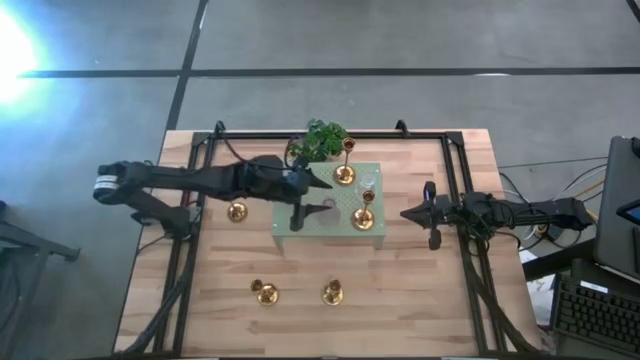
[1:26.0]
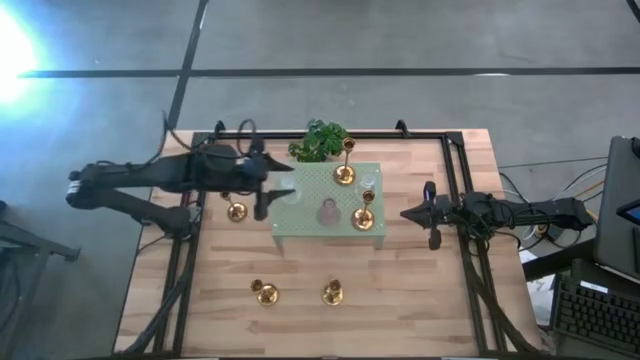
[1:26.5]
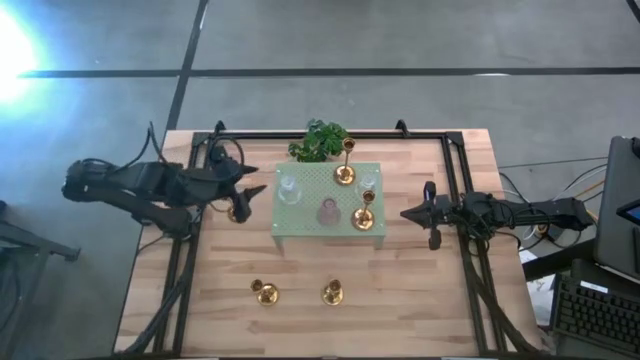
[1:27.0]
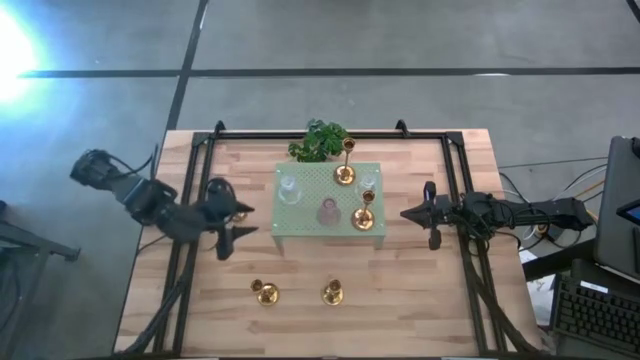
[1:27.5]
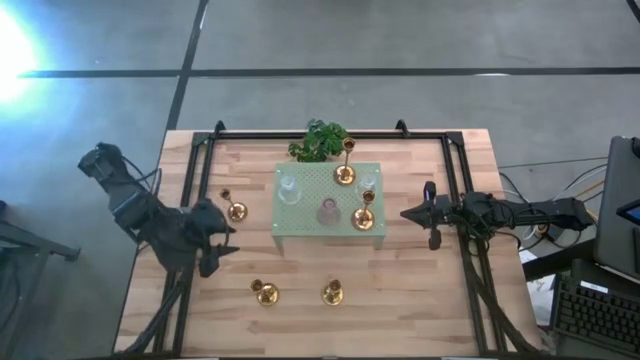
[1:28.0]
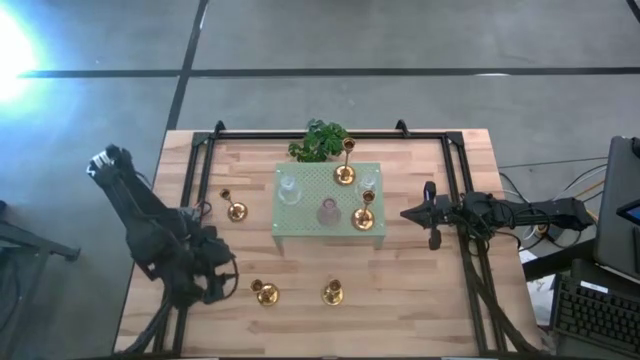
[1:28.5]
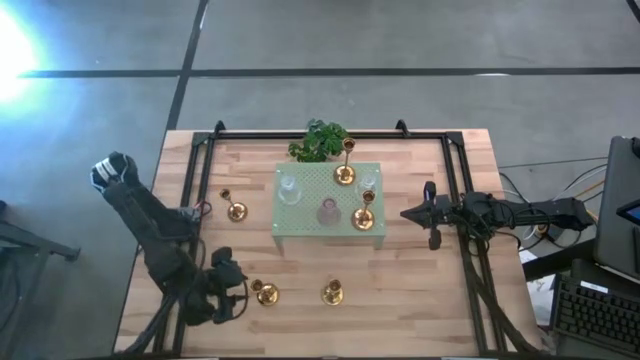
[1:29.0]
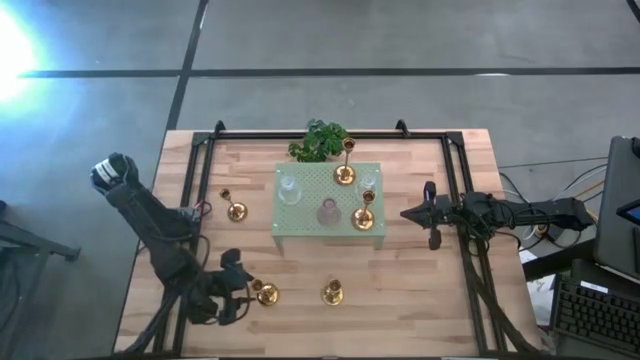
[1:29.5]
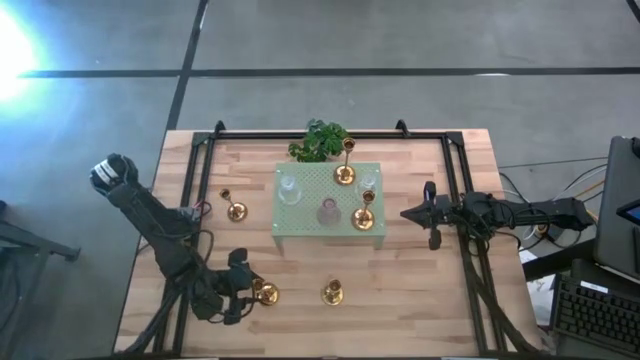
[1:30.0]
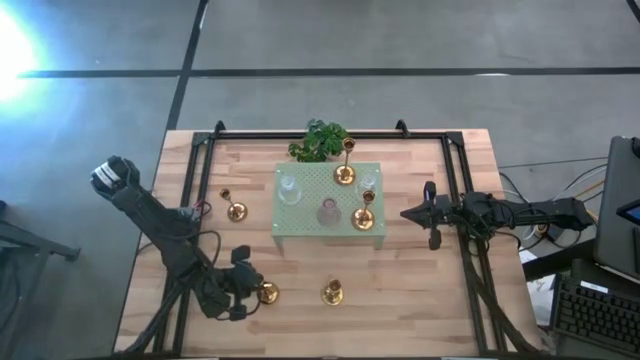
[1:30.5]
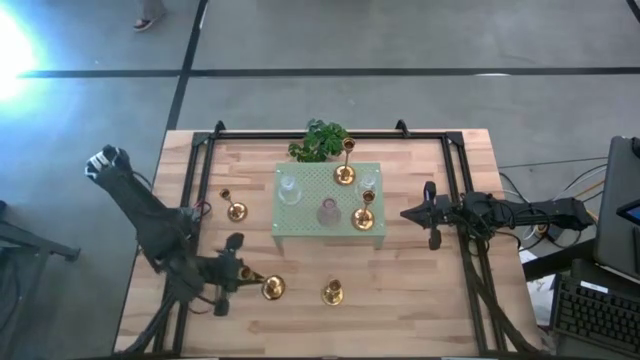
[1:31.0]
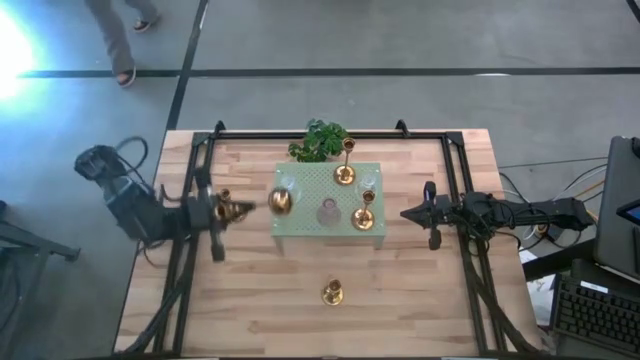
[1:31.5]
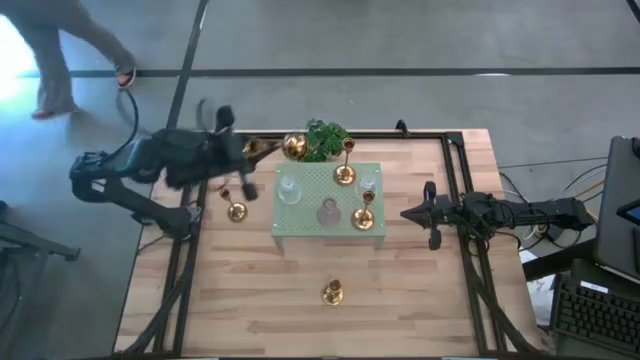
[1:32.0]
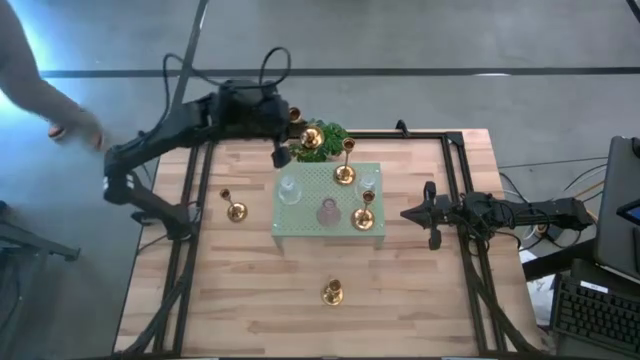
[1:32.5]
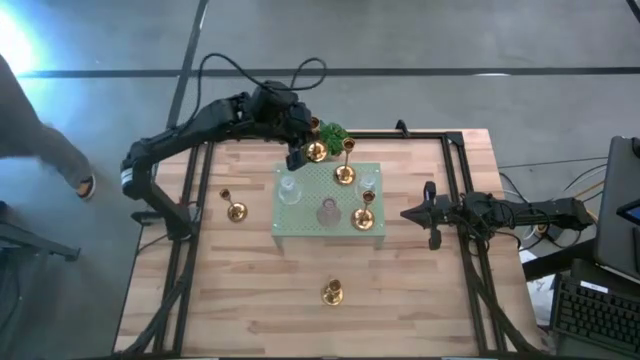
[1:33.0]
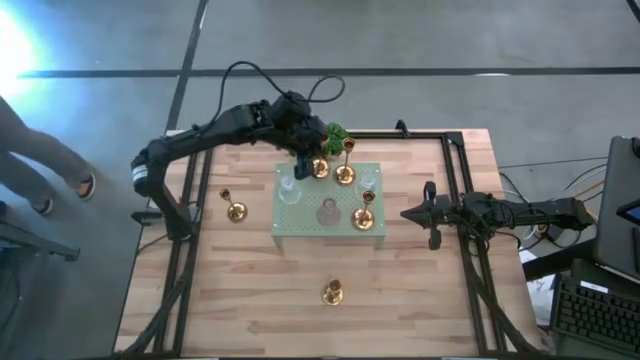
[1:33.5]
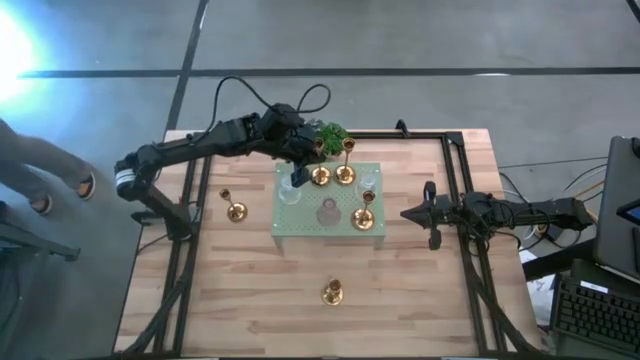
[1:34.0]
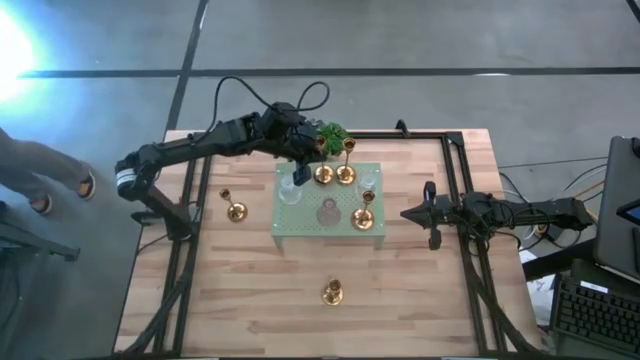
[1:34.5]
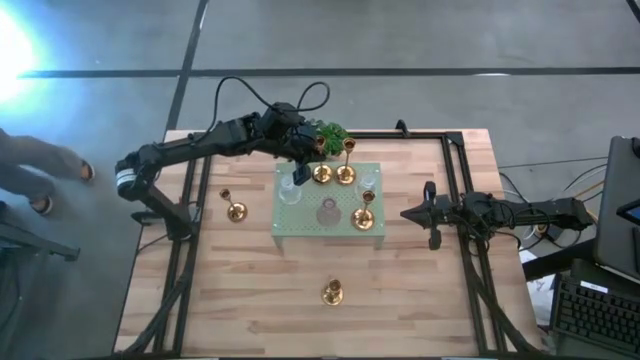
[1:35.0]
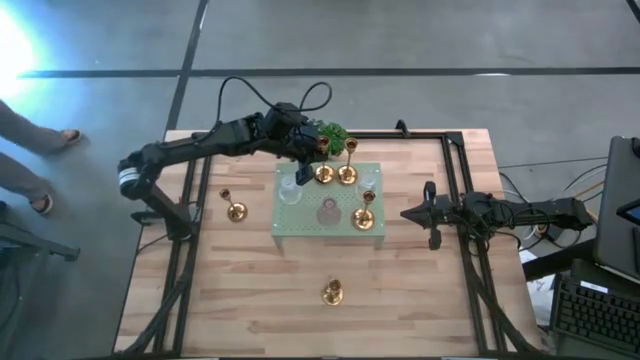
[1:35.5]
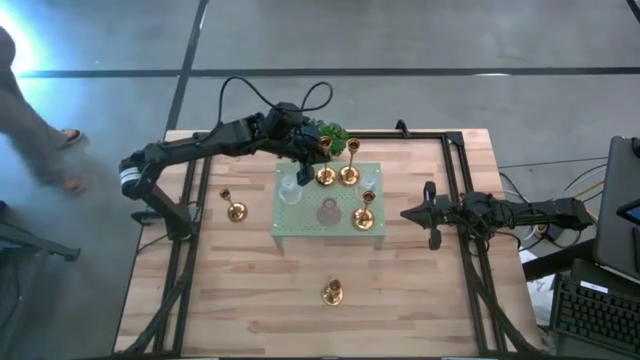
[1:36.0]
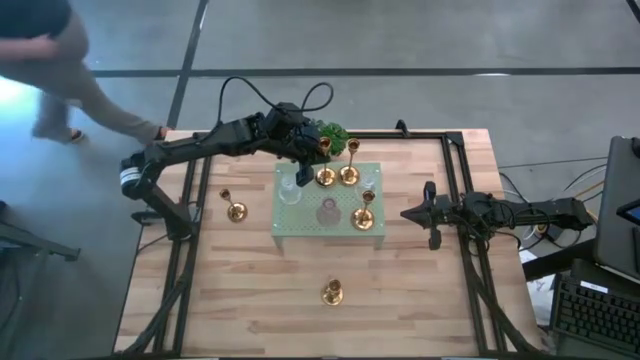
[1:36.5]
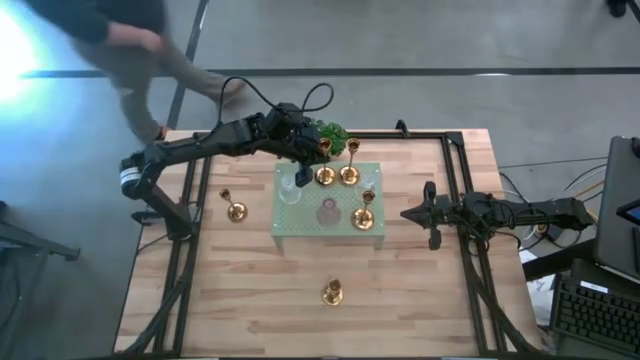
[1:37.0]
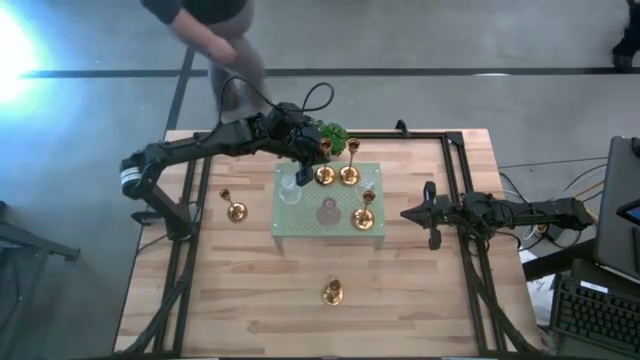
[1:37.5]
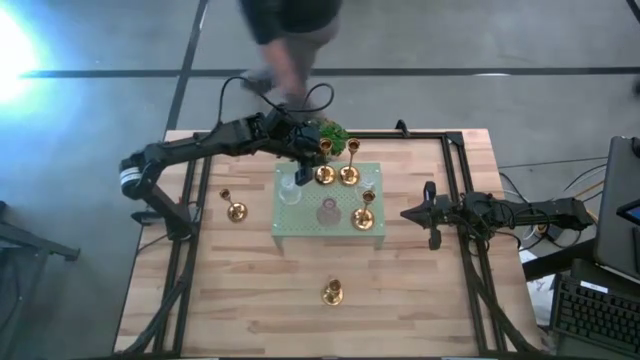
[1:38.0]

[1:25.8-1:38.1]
Task: Pick & Place candle stick holders
Put the gold candle holder on the shelf

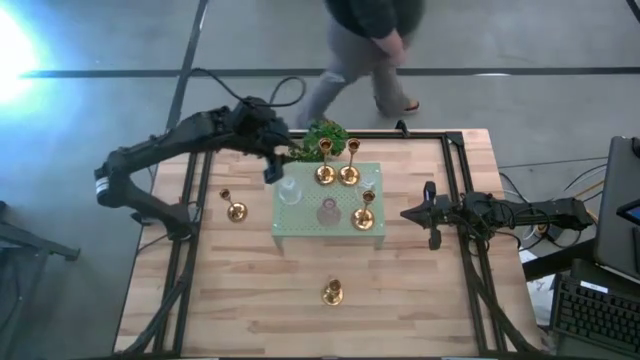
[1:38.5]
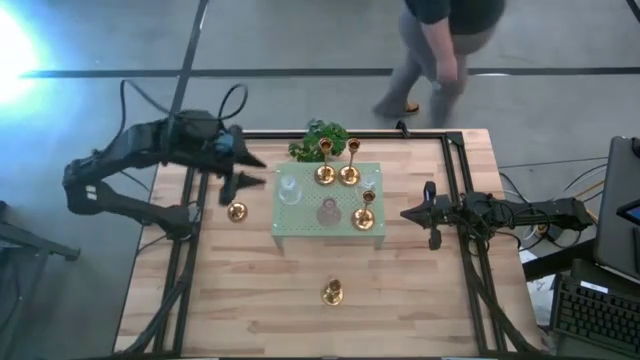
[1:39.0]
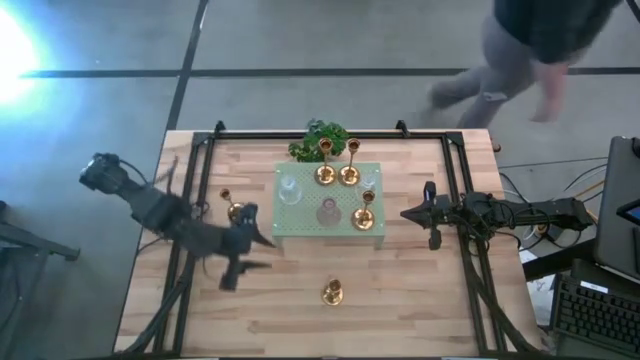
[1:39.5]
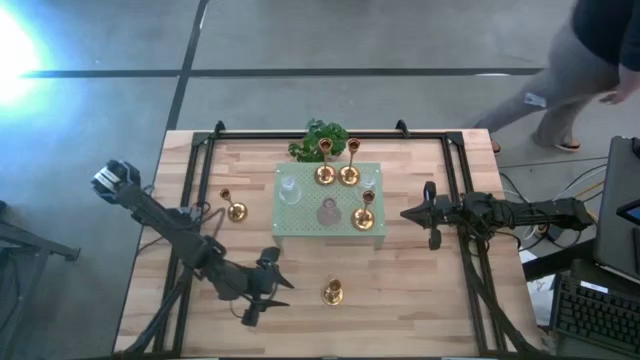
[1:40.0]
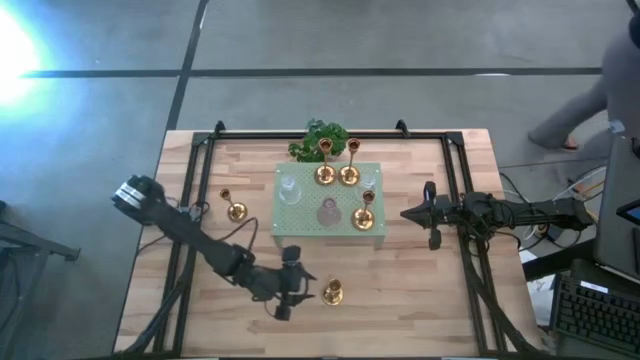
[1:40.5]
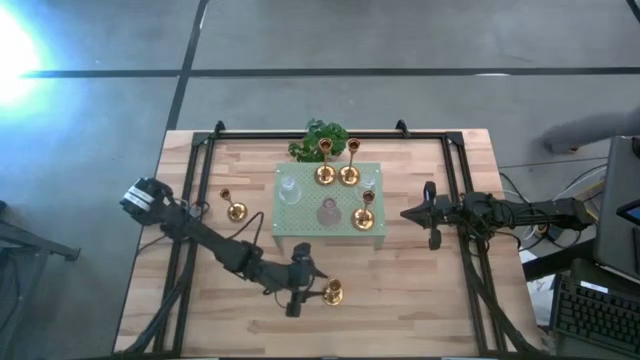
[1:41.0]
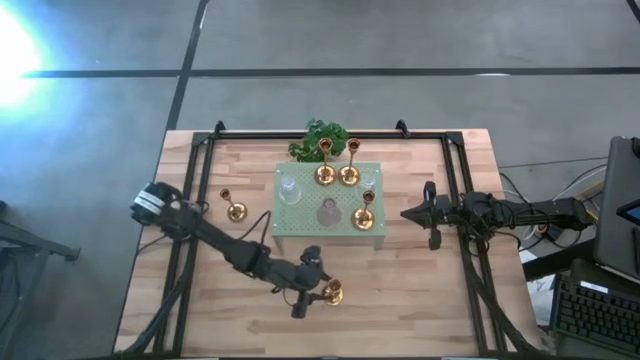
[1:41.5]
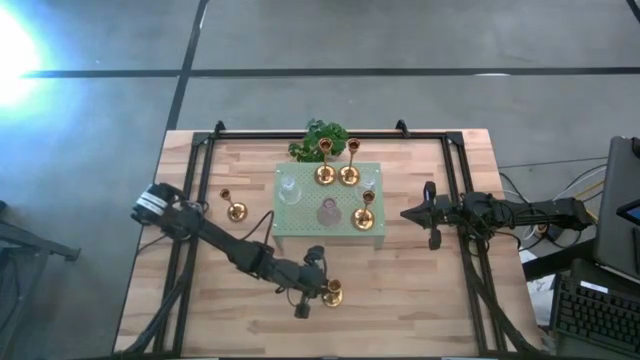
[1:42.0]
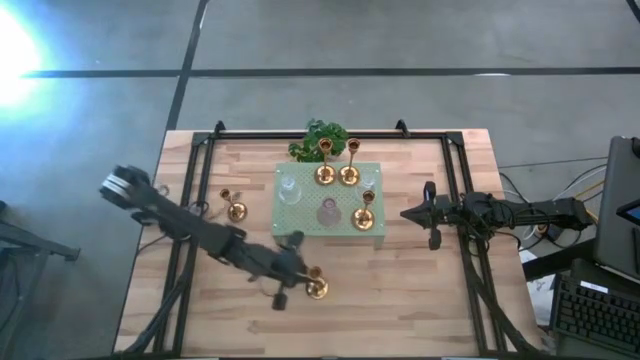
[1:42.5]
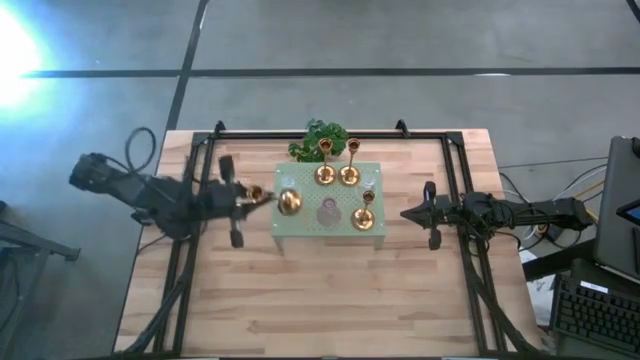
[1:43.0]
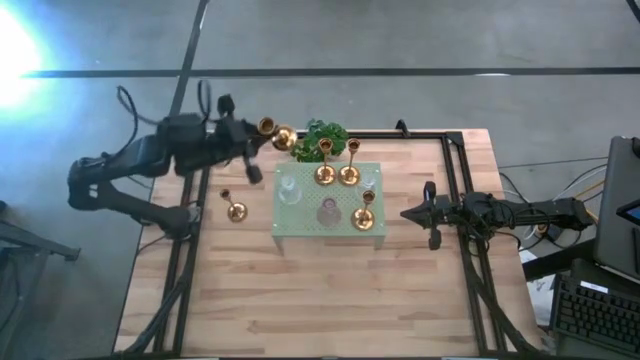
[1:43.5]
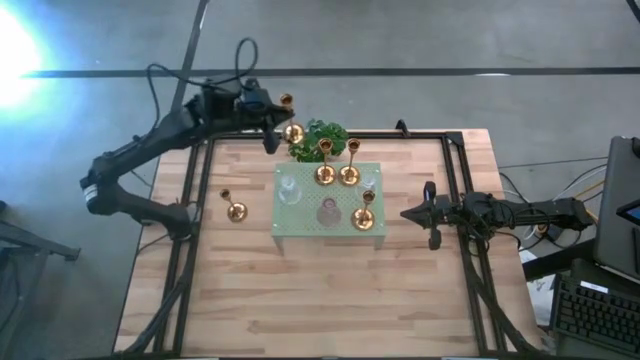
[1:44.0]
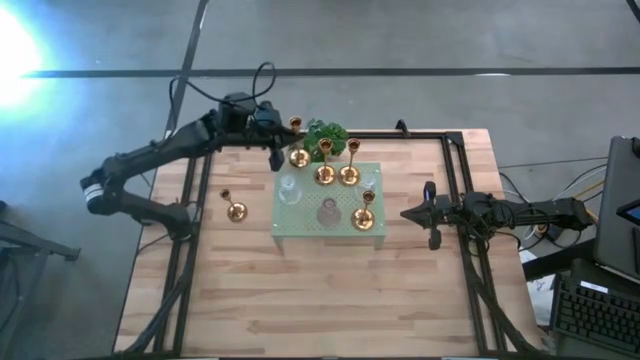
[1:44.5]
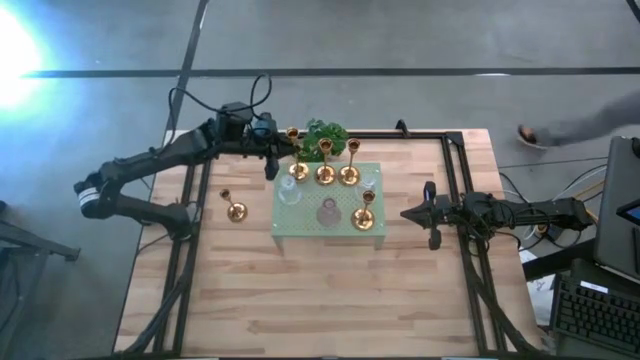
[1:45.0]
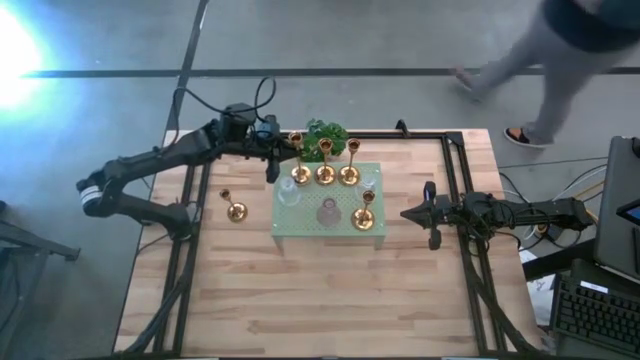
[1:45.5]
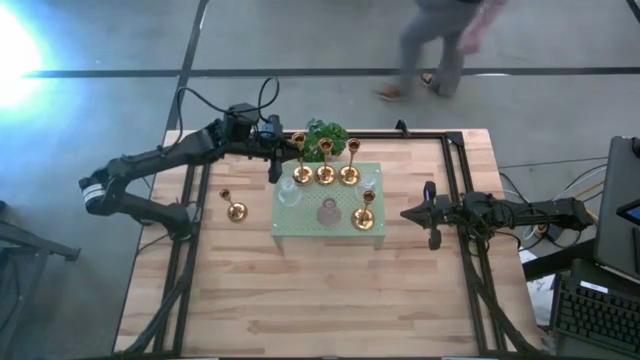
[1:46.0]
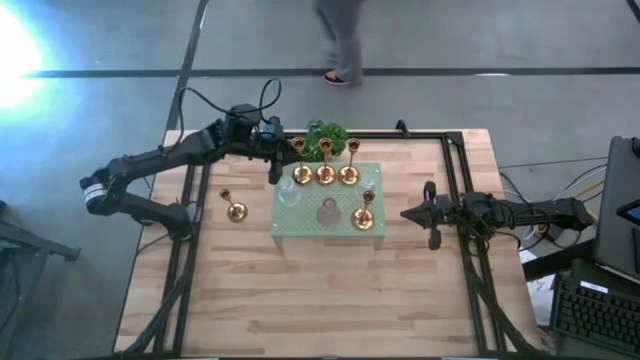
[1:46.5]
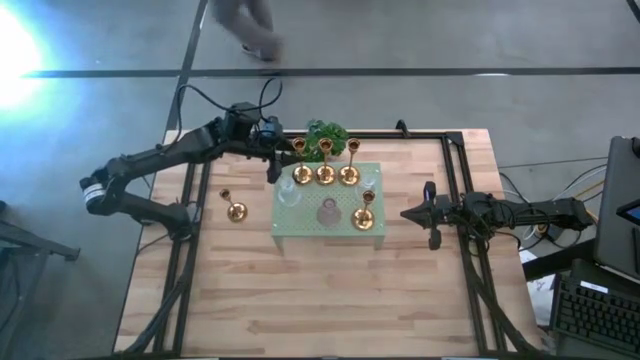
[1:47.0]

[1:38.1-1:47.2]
Put the gold candle holder on the shelf
